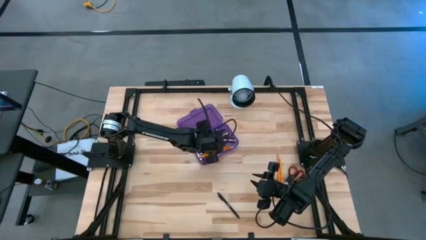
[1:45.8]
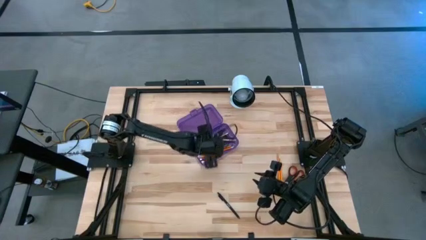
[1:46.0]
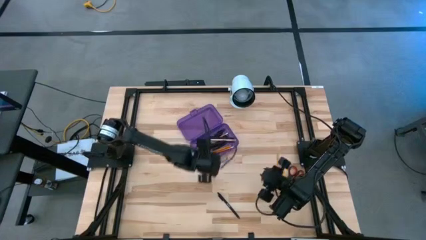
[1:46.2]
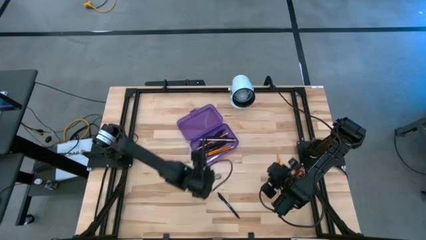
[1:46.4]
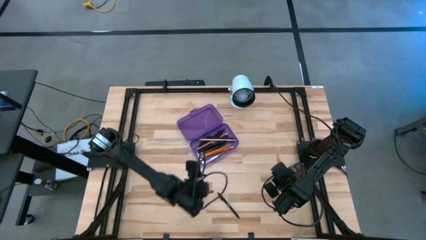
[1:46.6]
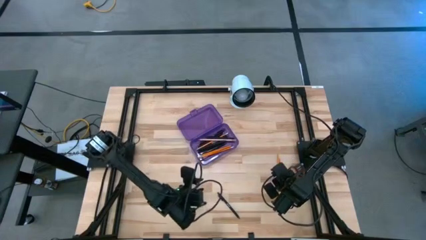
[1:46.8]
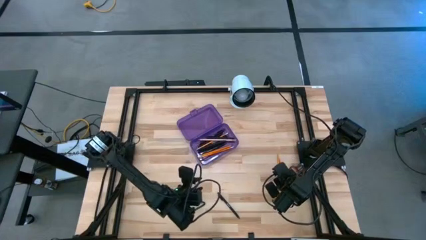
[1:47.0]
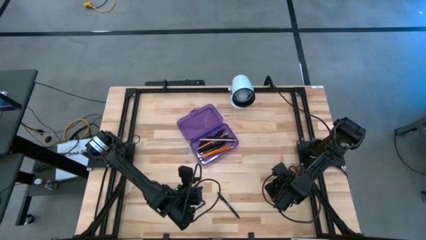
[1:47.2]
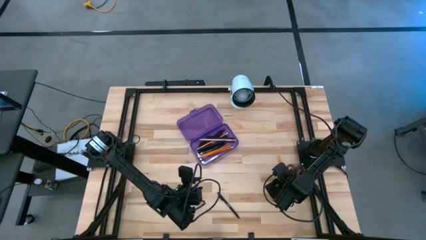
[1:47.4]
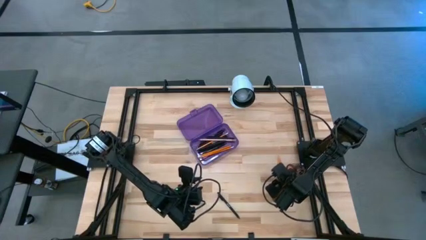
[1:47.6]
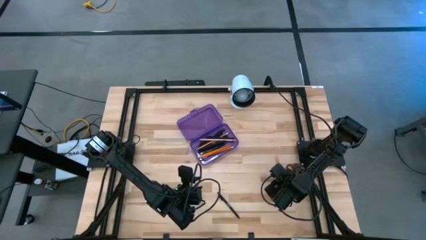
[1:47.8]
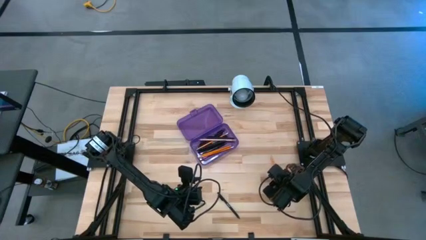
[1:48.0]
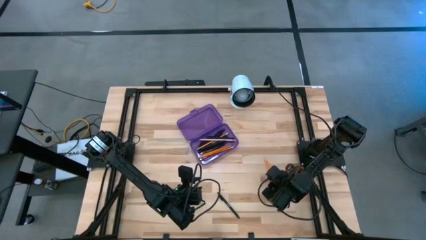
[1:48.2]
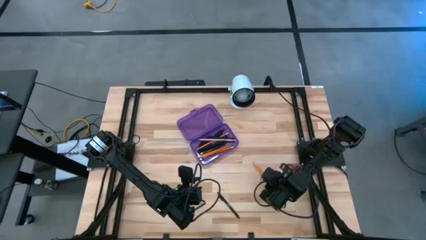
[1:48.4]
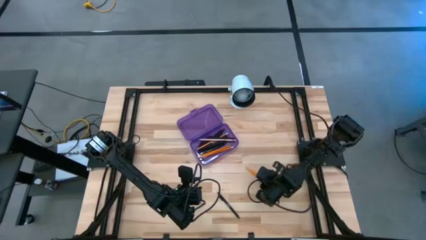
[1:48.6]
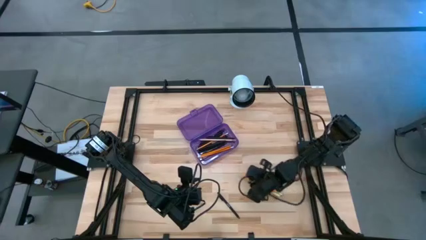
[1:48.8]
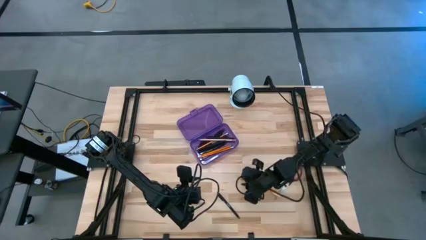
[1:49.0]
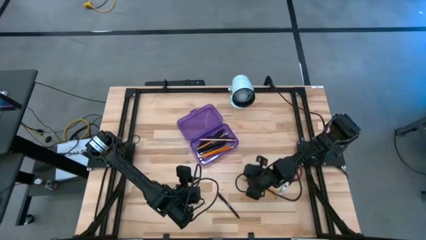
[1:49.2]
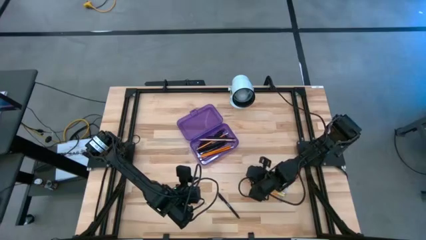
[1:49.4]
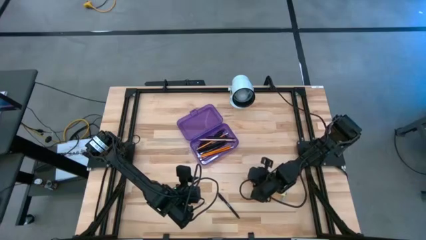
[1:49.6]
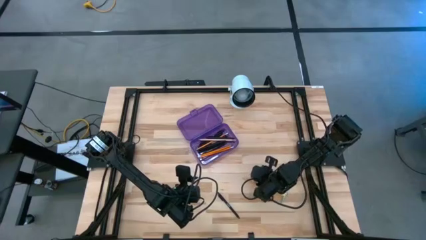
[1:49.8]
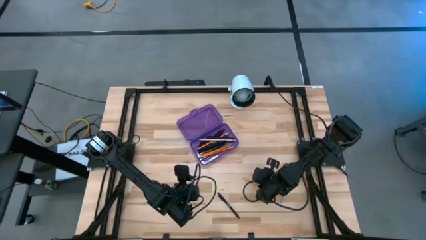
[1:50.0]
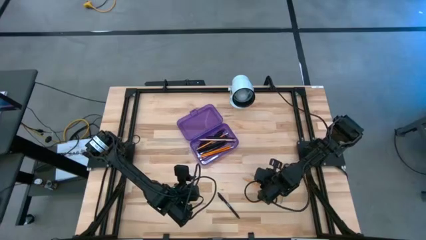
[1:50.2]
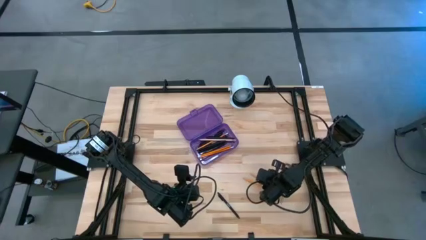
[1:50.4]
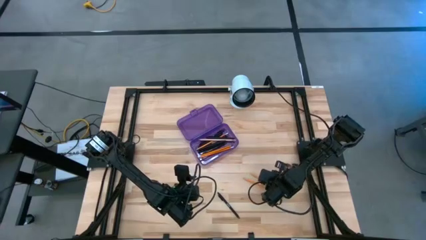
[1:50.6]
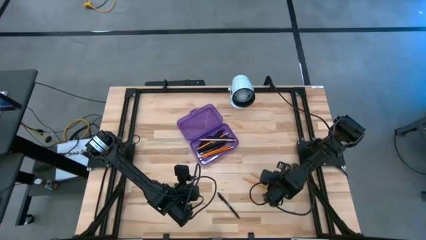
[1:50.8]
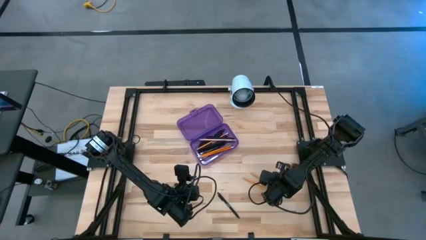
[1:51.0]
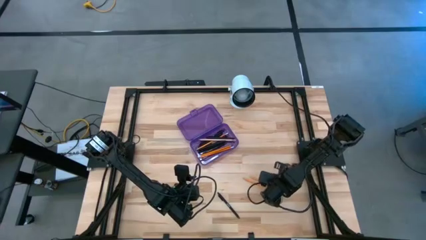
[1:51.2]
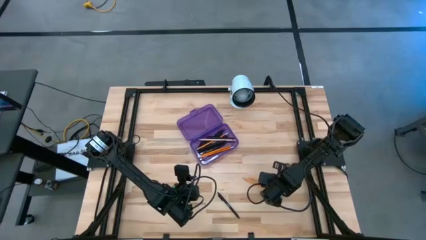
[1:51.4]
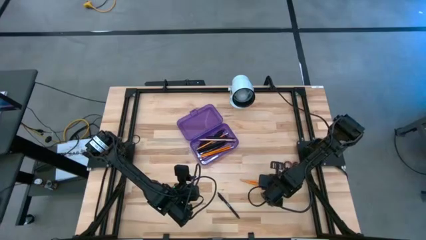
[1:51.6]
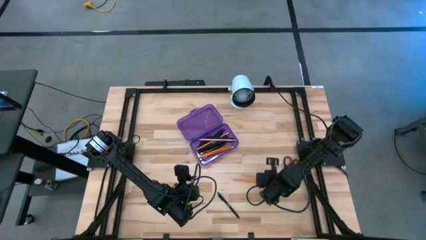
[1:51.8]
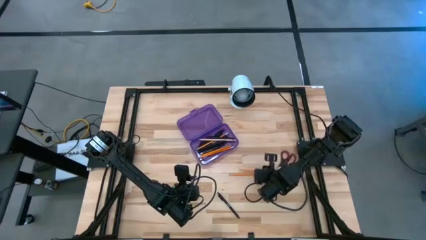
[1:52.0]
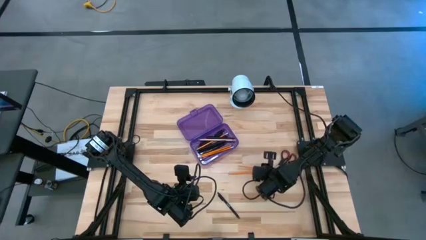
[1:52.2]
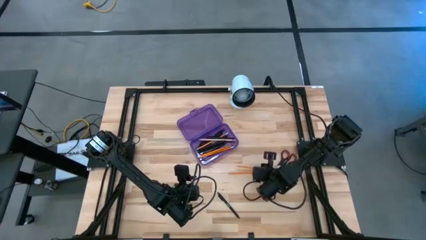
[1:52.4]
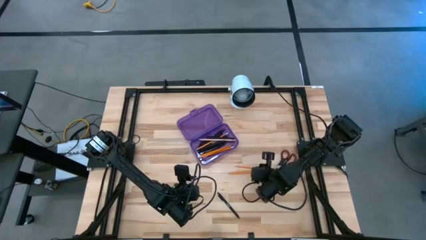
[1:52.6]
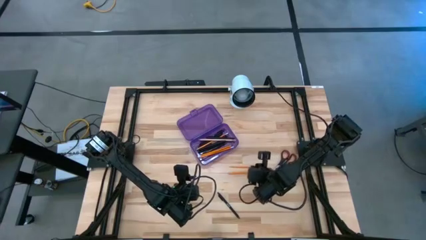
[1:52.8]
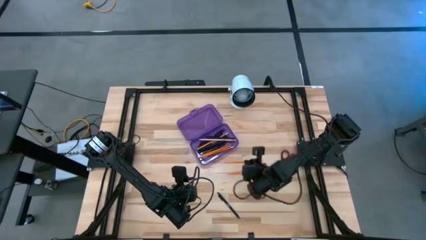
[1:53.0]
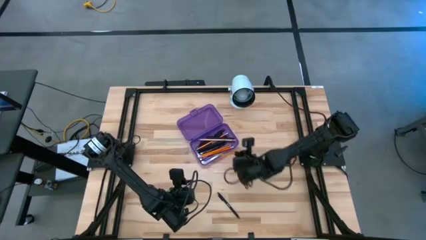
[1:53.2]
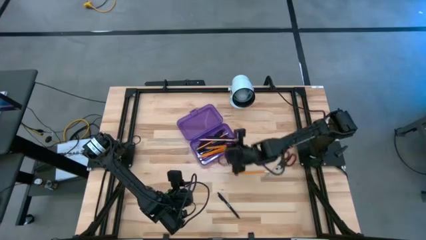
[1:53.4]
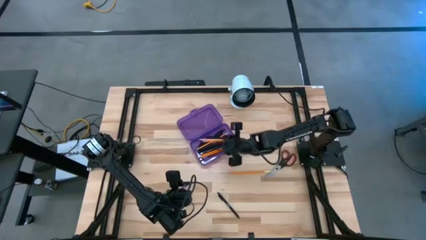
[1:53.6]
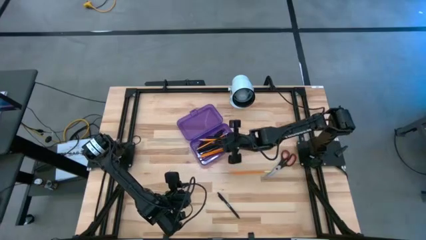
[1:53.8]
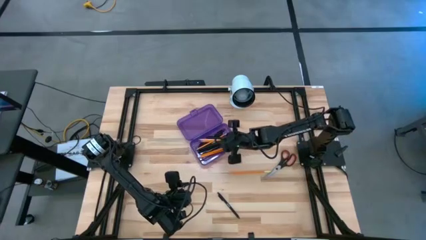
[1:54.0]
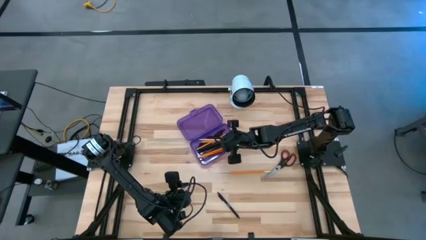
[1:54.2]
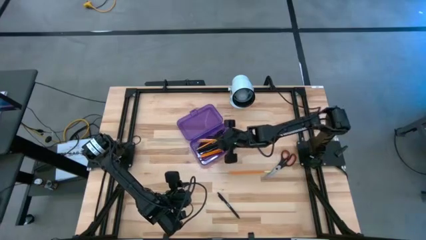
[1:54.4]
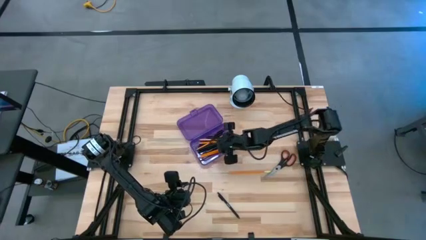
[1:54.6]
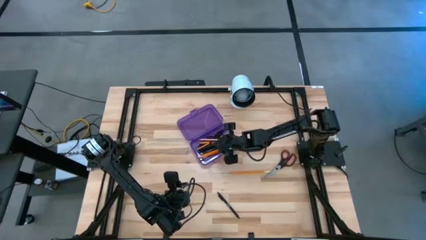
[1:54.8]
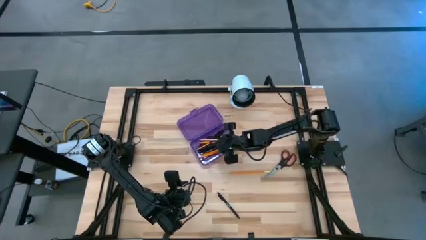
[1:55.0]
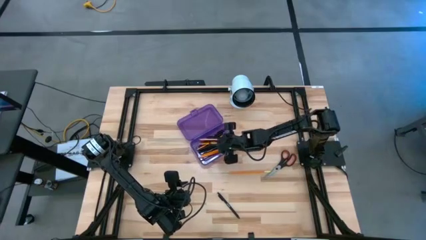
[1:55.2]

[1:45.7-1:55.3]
Task: Pick & place school supplies into a supply box
Put the orange pencil into the purple supply box

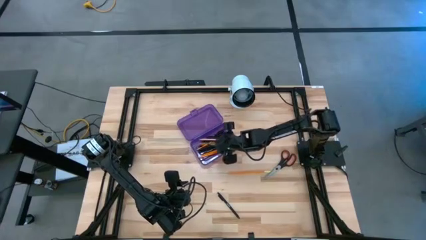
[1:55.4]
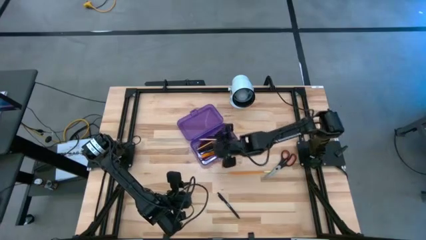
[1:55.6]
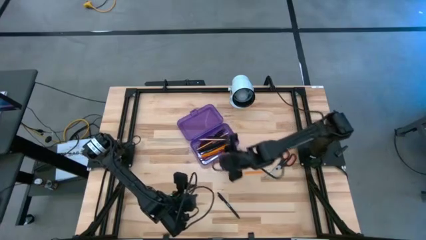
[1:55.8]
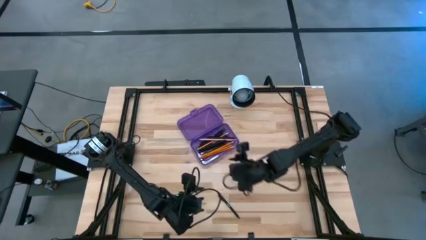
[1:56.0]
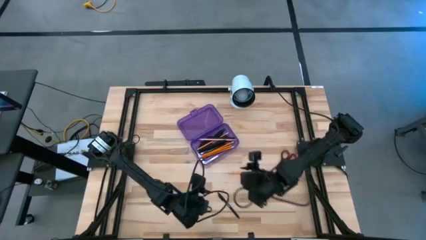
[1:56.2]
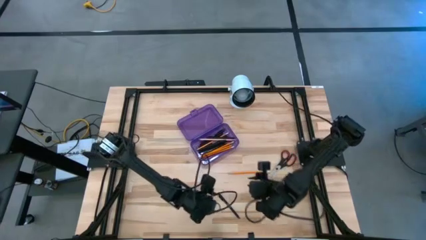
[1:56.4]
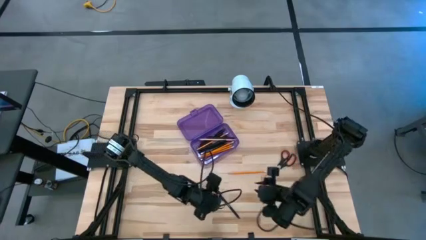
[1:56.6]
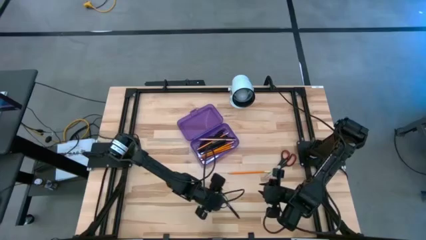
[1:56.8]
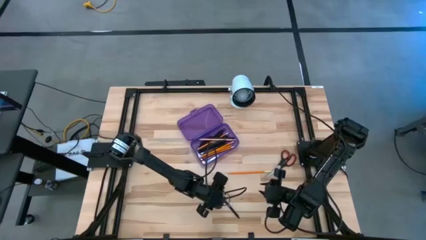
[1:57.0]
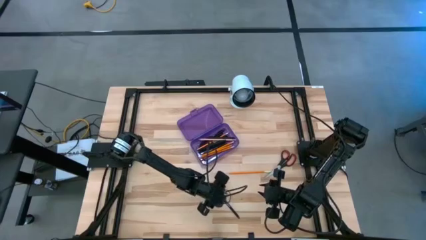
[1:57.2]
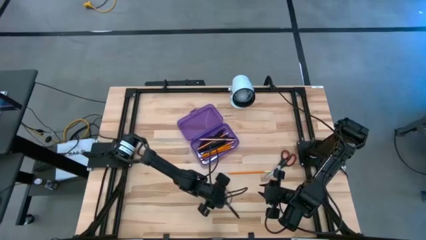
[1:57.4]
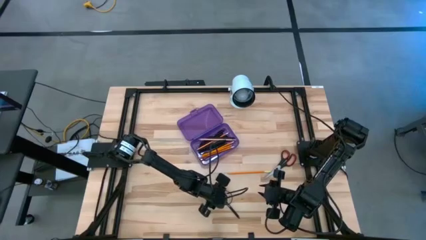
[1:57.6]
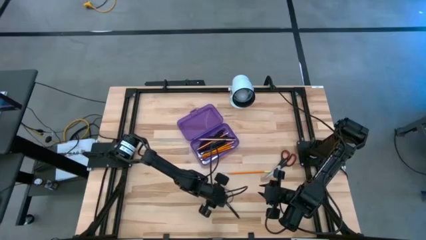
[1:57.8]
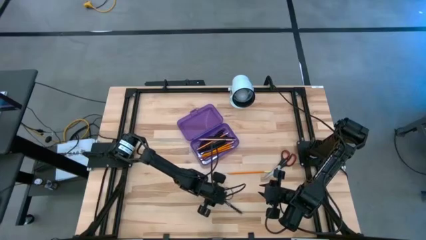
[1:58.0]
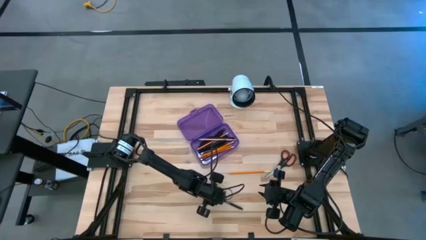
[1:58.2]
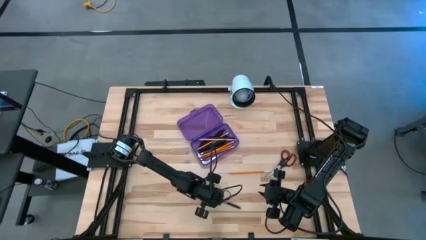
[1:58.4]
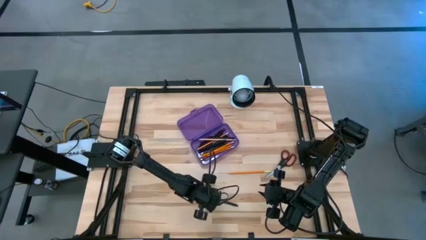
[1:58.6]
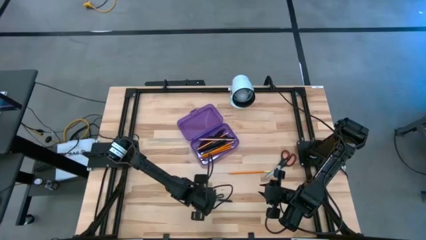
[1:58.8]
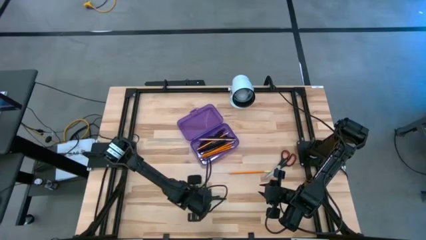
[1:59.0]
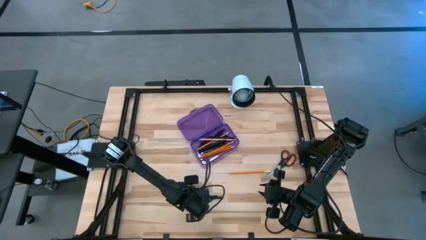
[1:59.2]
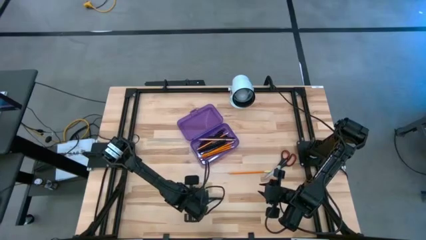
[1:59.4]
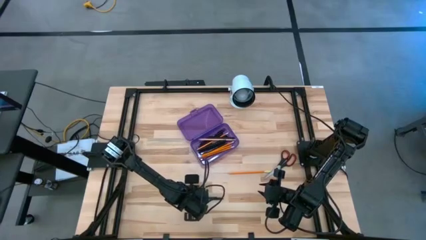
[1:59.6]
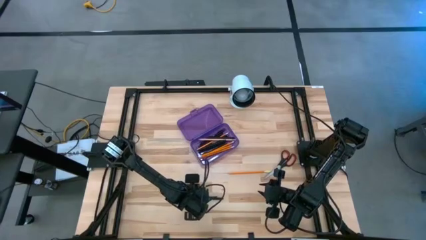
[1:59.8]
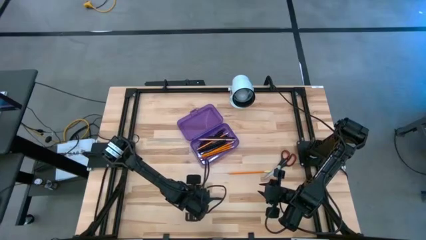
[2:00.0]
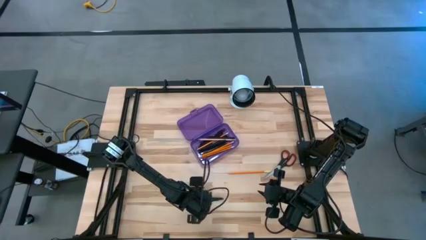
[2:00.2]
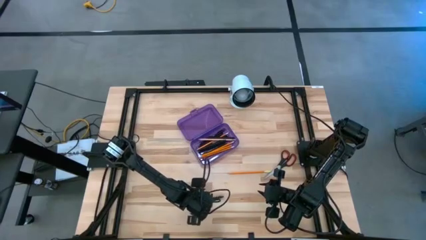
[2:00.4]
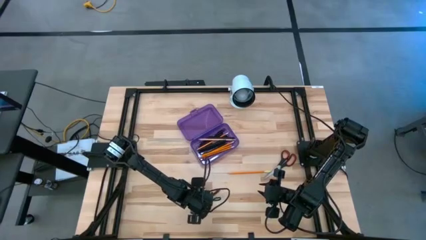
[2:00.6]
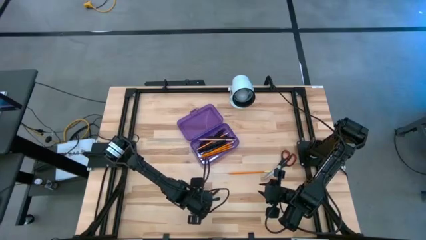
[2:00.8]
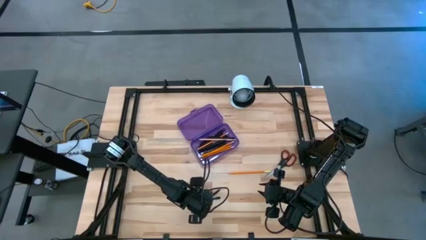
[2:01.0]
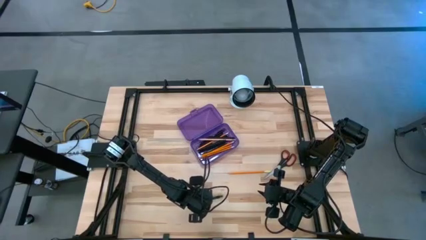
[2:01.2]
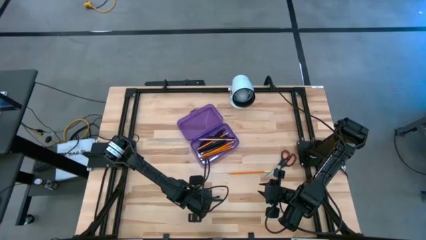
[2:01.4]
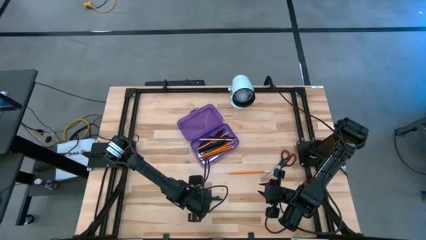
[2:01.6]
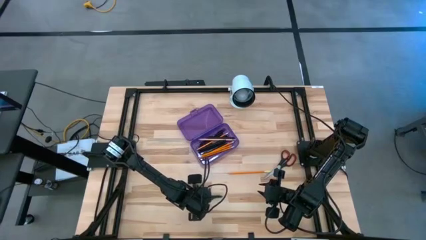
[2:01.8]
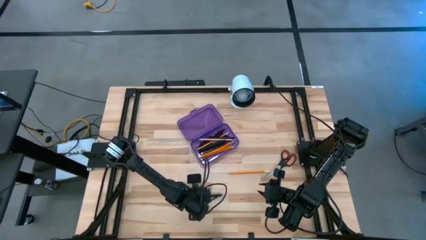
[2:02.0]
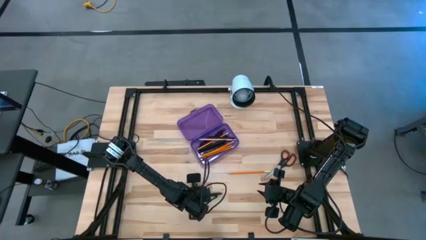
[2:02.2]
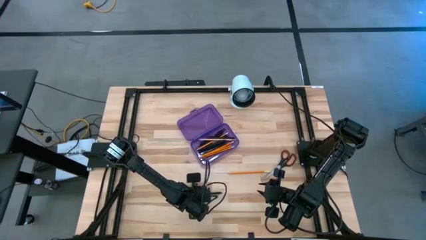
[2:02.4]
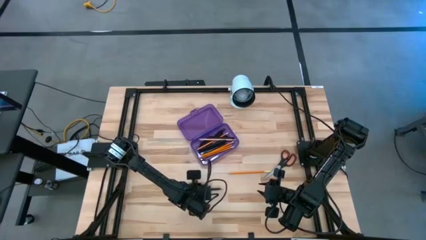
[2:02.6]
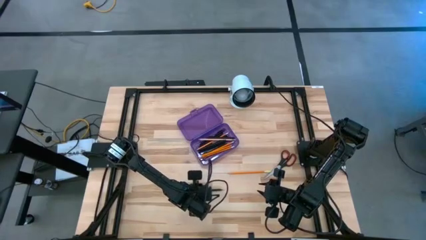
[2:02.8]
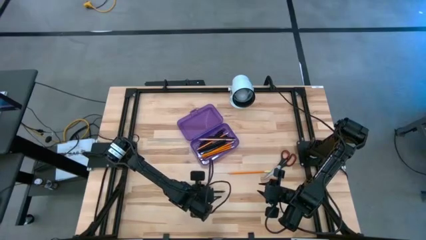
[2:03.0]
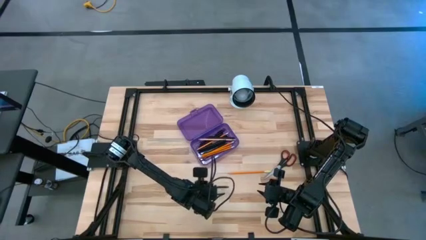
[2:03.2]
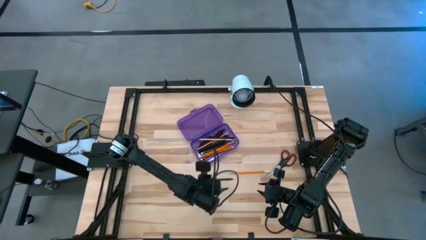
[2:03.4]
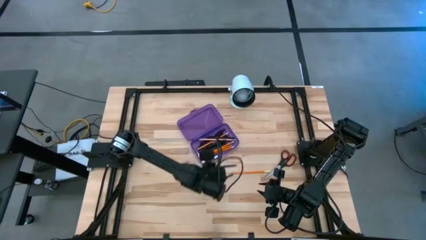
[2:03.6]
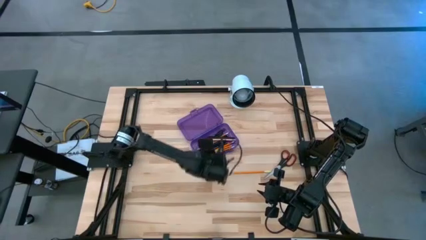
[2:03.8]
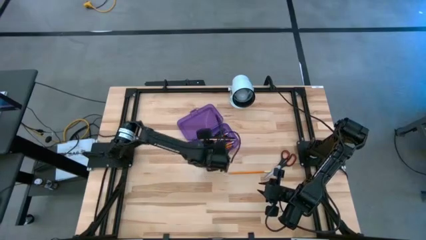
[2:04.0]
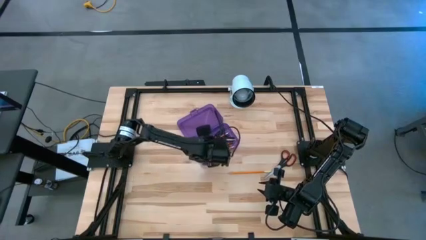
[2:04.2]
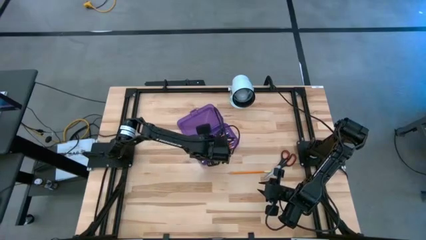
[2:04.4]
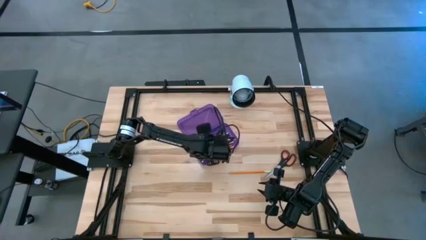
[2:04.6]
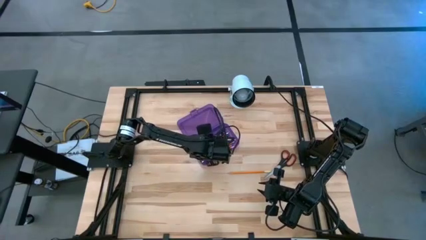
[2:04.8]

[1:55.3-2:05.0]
Put the black pen into the purple supply box
